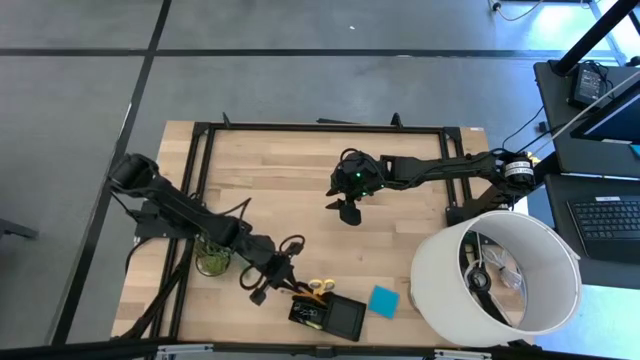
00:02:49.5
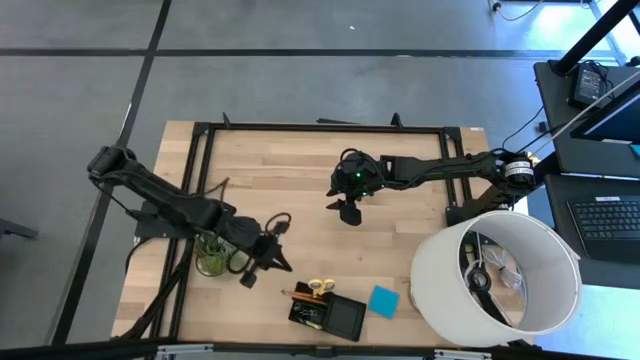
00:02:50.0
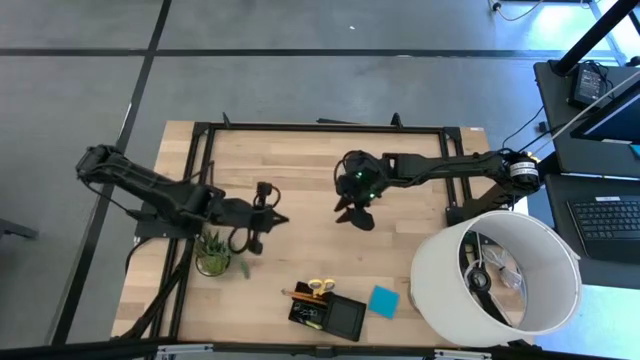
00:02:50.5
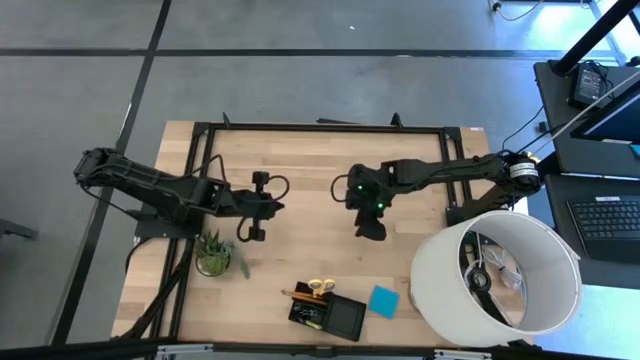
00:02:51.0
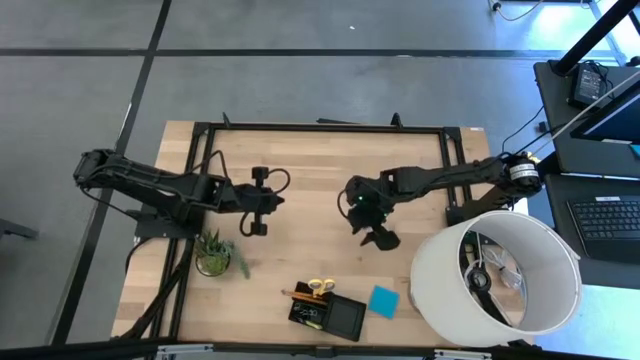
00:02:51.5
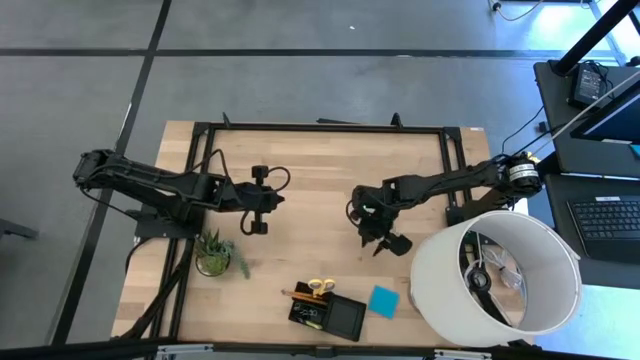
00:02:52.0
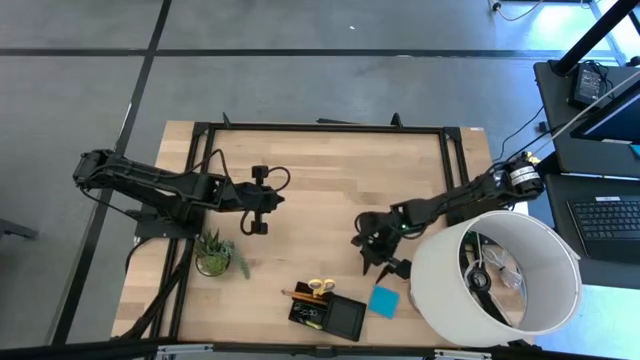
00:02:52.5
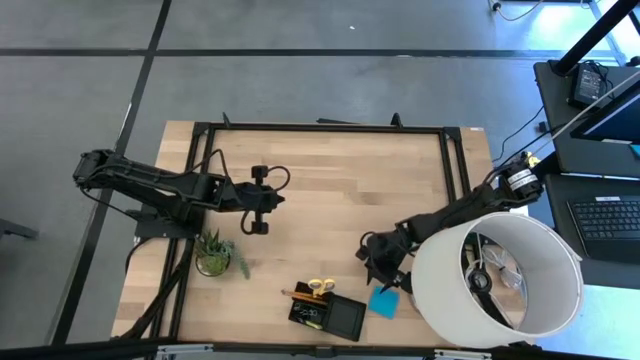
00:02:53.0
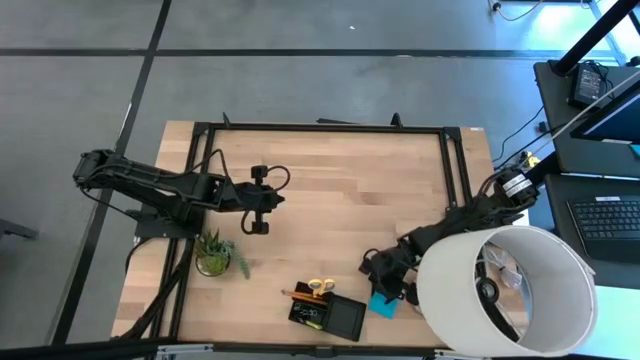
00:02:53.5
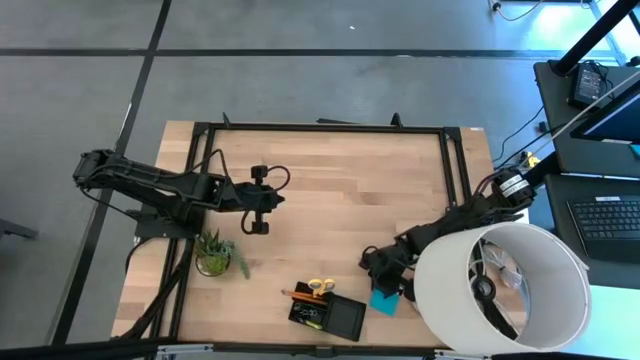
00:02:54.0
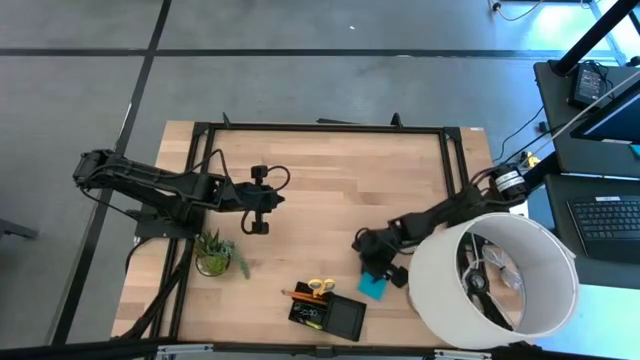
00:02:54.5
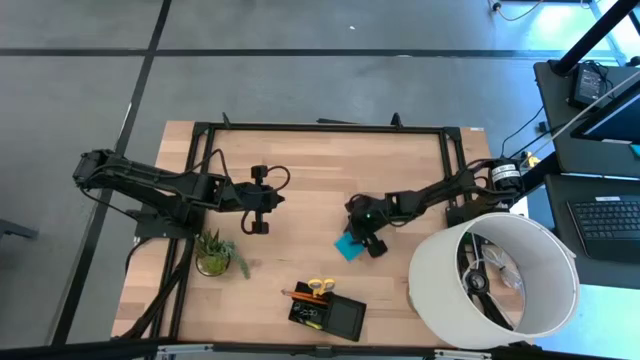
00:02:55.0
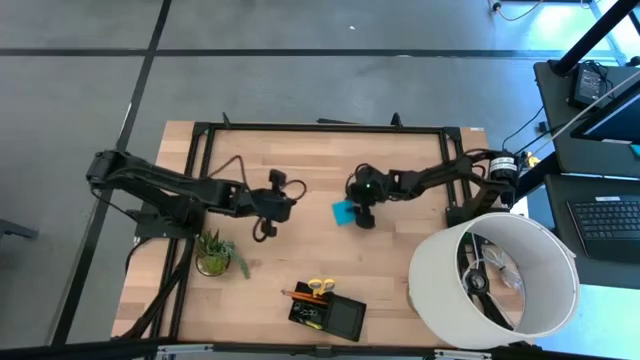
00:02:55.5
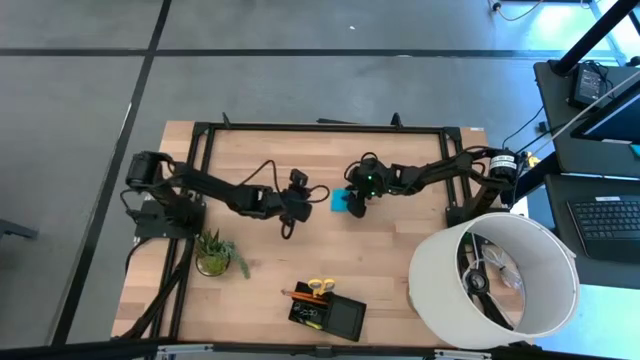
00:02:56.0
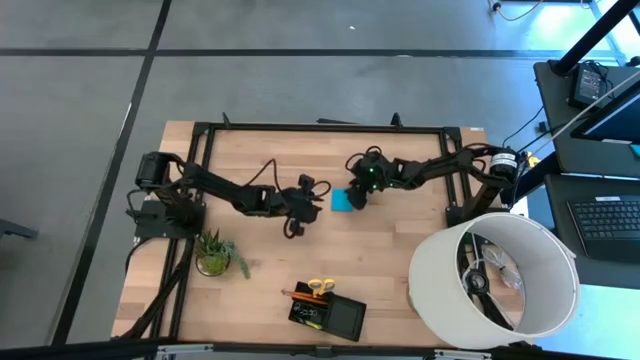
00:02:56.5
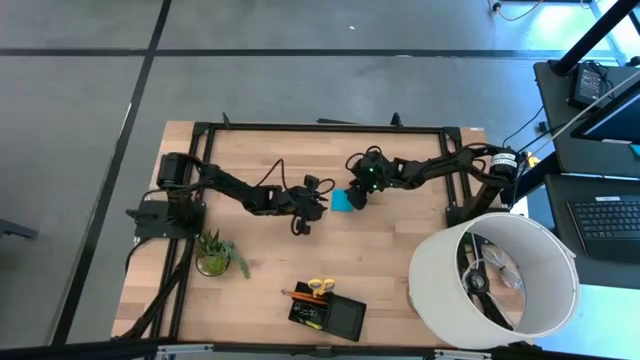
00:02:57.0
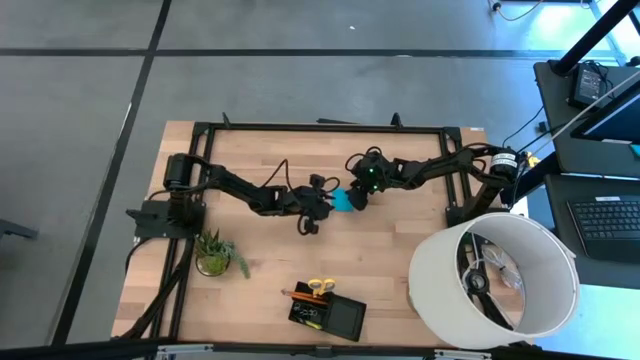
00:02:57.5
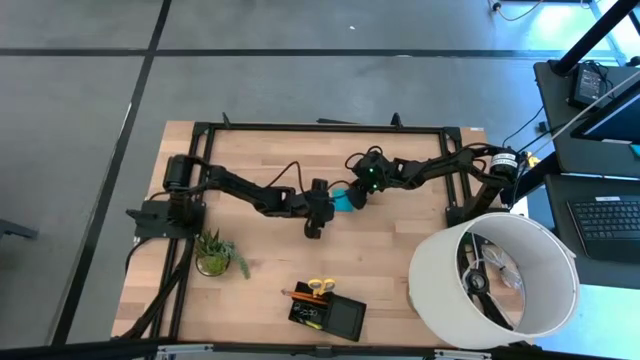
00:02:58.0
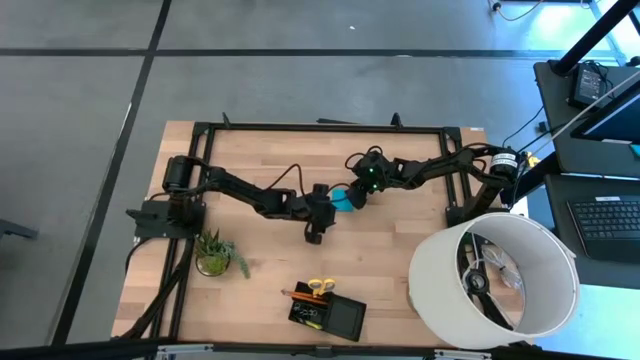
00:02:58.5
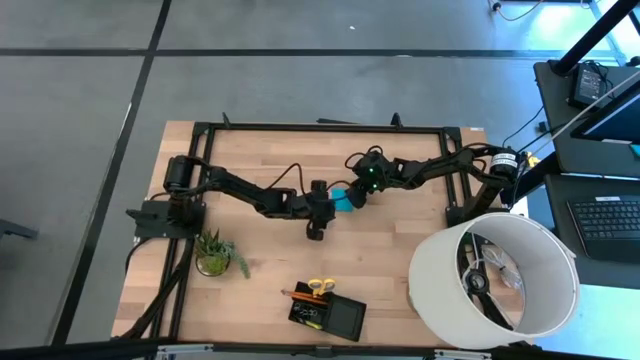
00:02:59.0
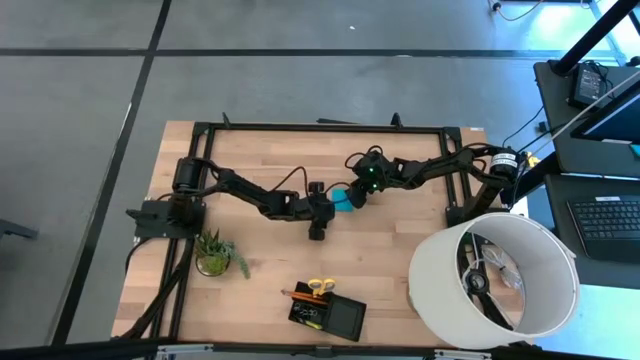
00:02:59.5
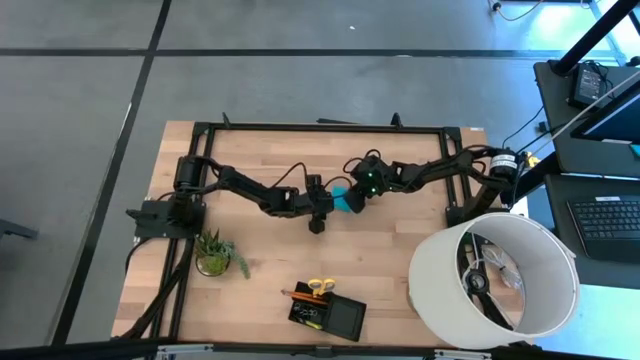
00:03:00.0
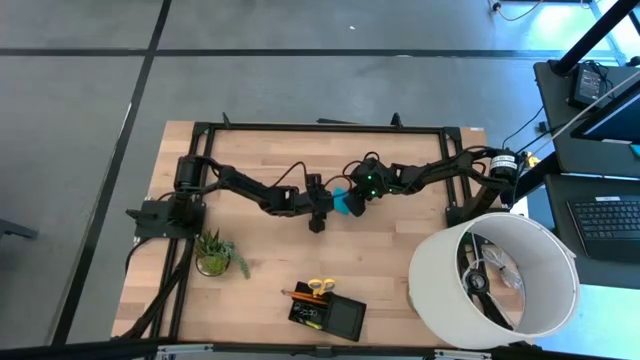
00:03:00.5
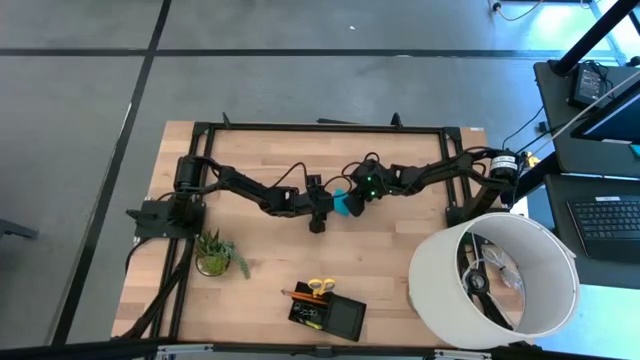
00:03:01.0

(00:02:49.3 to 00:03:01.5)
Task: Pick and place office supplies into organizer
Put the blue sticky notes into the black desk organizer

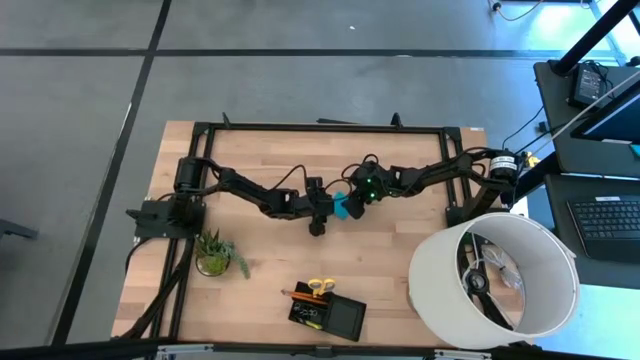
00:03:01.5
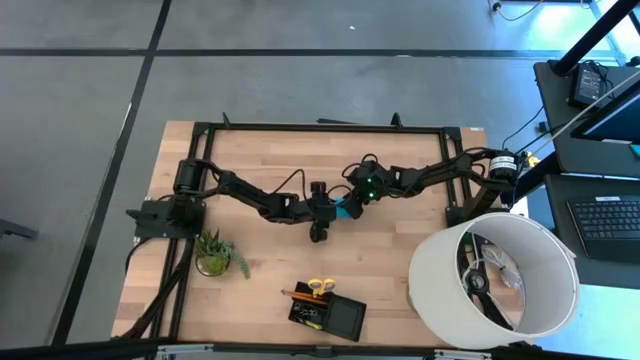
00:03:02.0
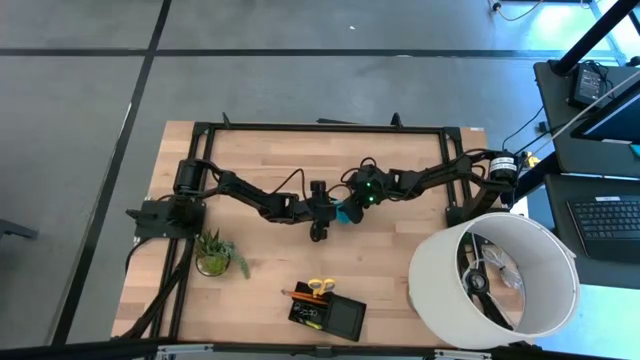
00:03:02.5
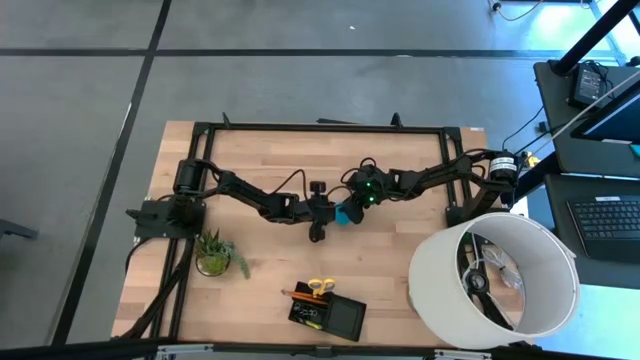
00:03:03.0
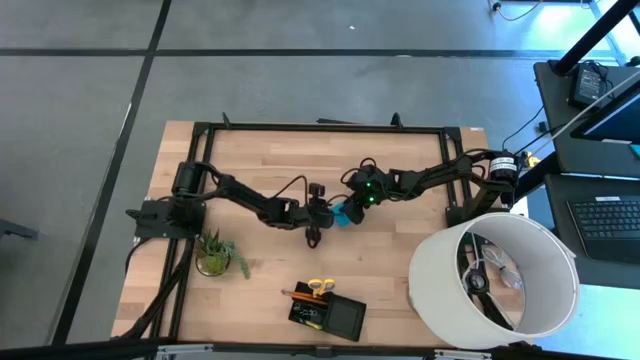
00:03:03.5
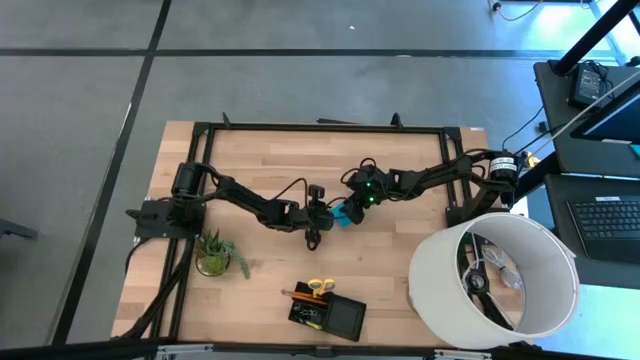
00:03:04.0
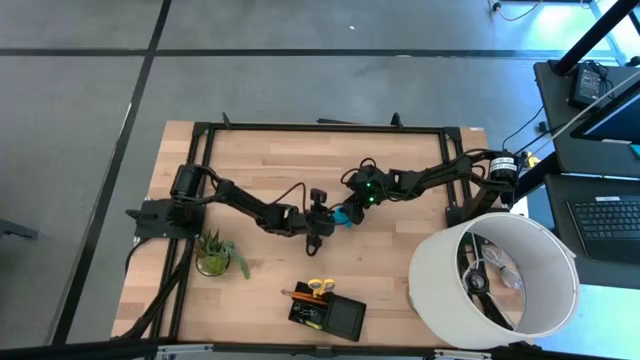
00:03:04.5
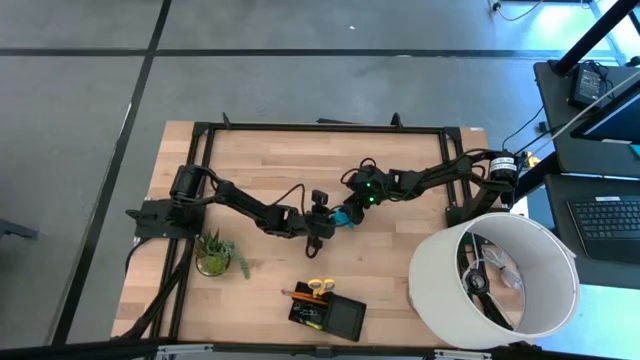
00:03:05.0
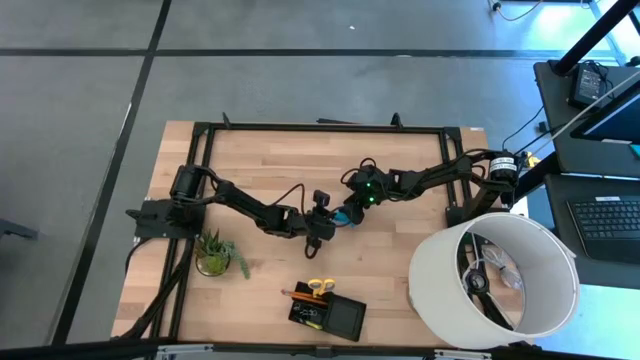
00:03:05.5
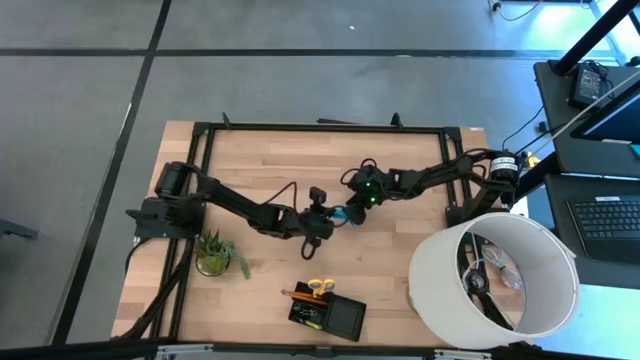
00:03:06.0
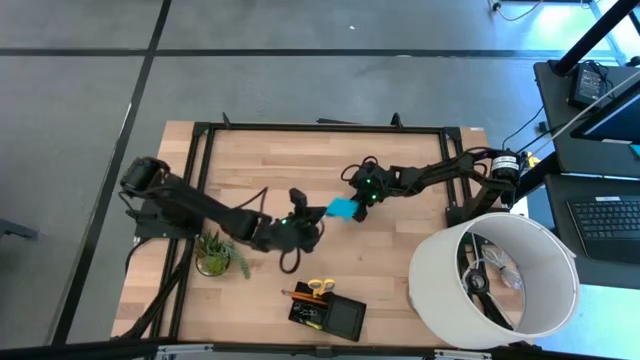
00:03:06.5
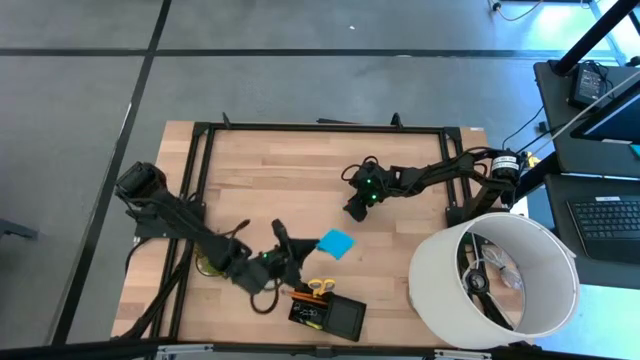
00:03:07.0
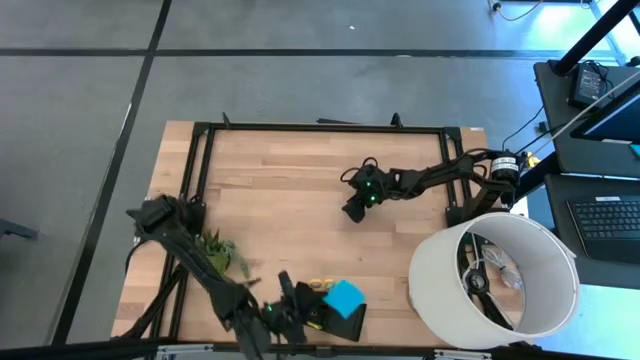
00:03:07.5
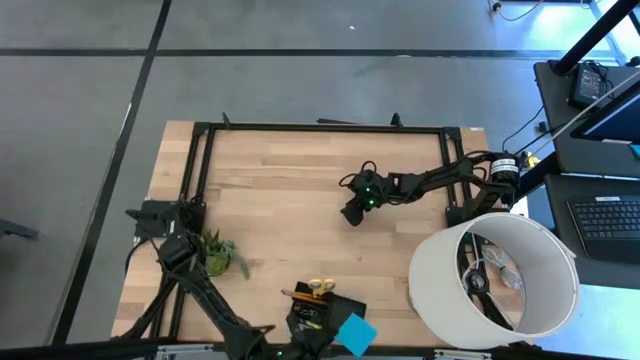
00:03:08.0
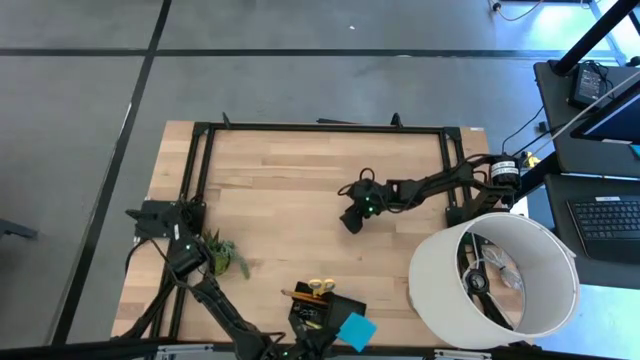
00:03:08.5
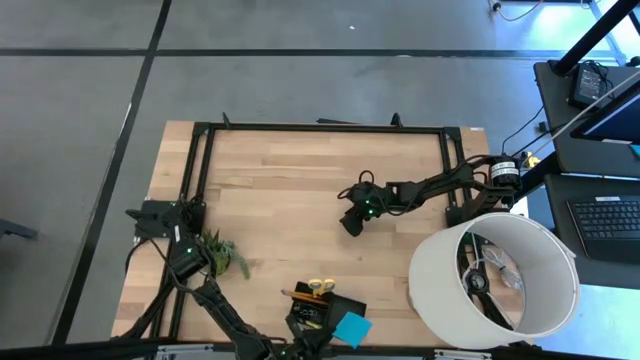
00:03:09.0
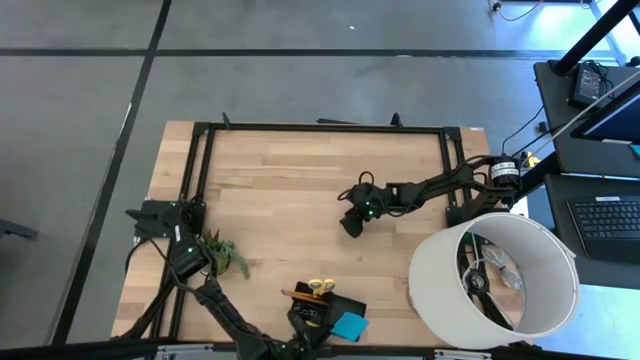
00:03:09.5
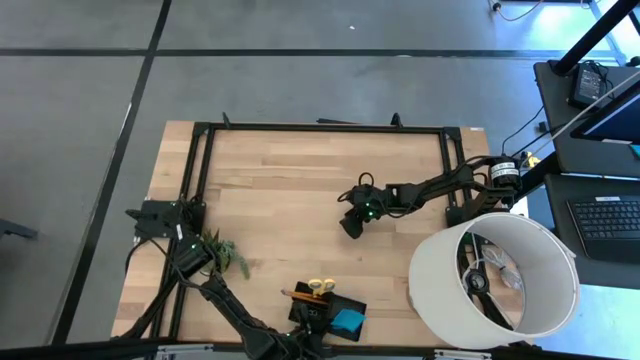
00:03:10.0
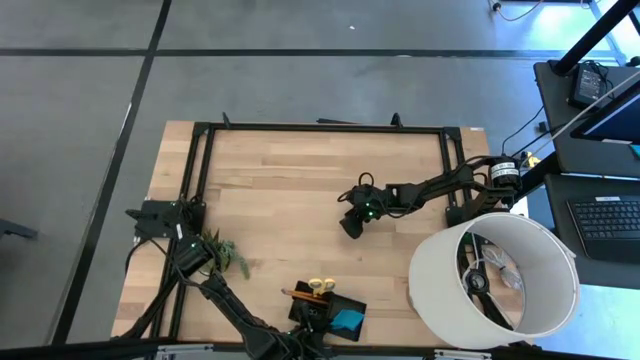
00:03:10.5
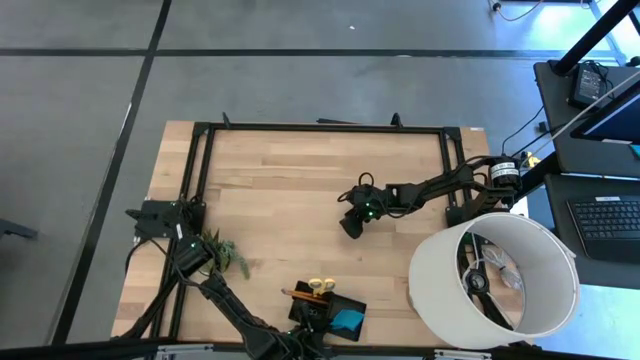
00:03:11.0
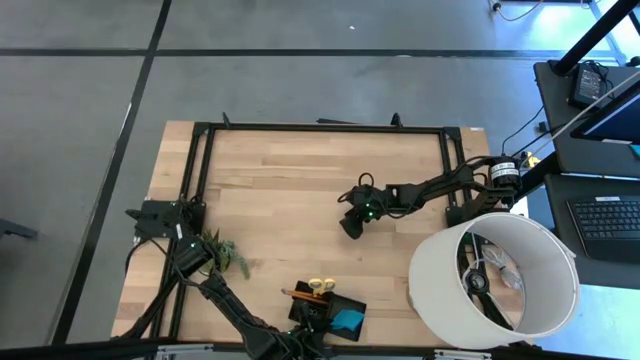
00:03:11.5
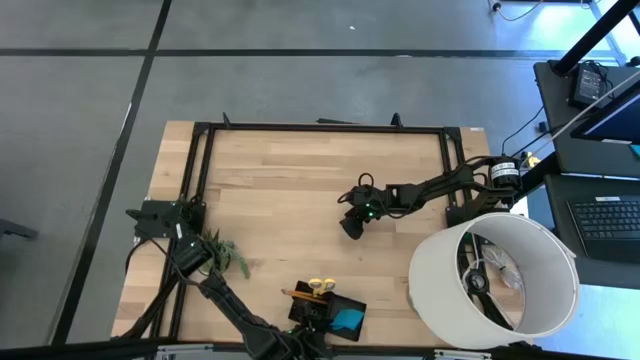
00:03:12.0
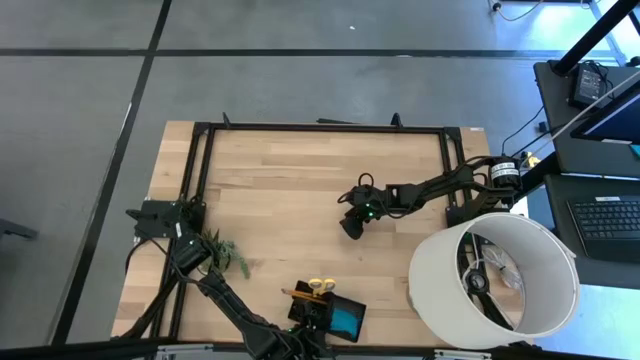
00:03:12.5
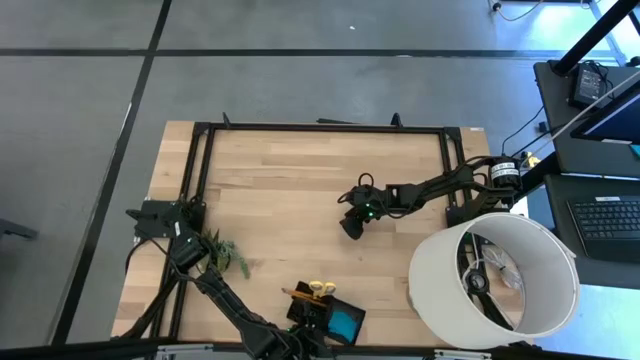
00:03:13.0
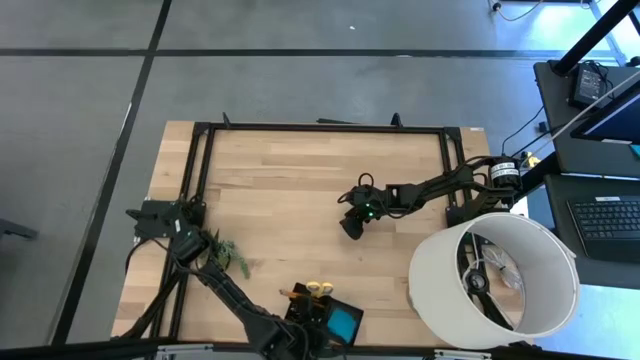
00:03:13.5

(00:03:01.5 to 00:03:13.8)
Put the blue sticky notes into the black desk organizer
